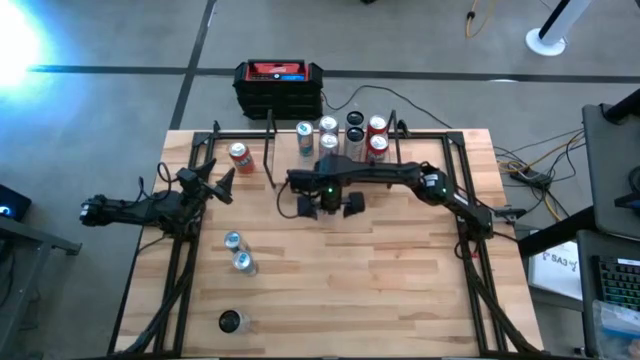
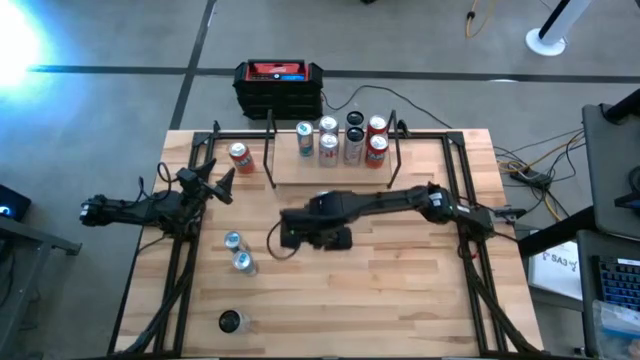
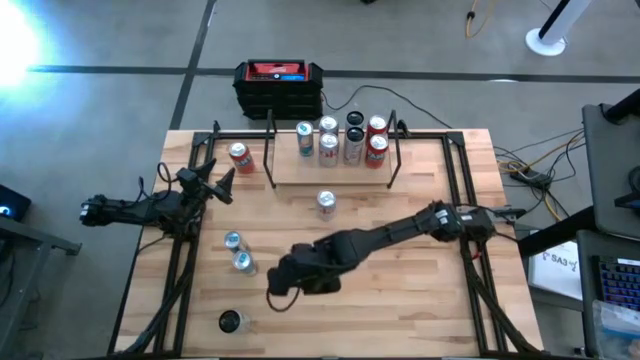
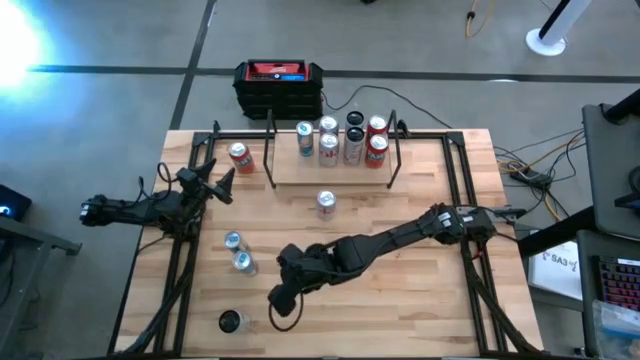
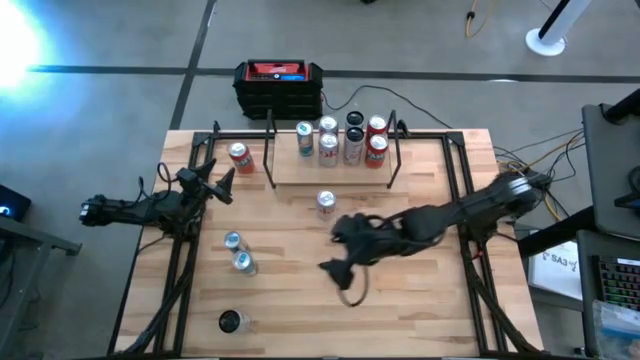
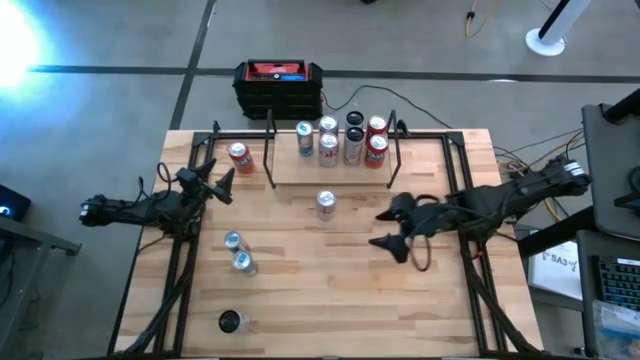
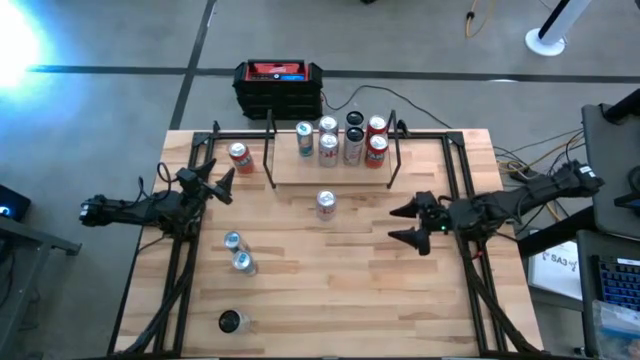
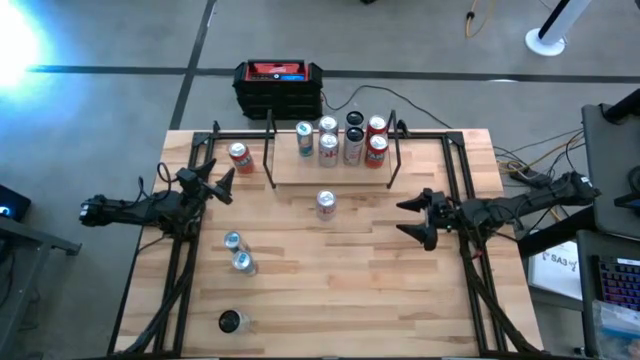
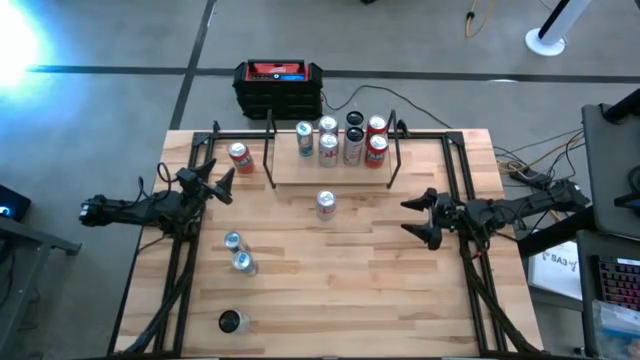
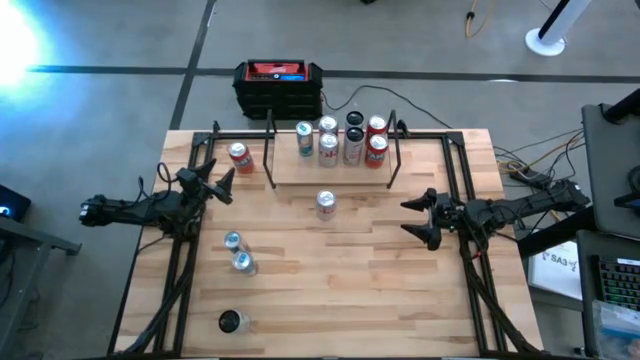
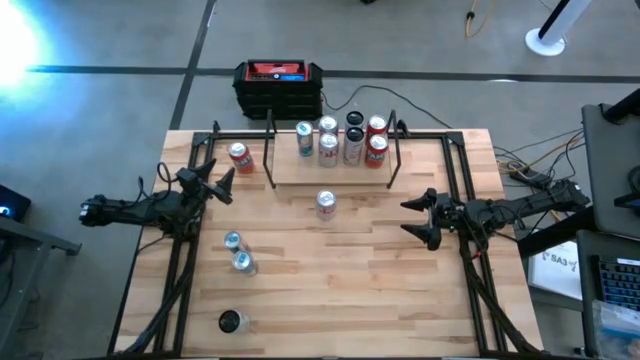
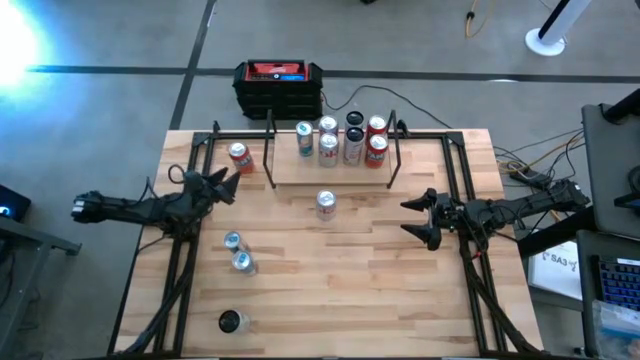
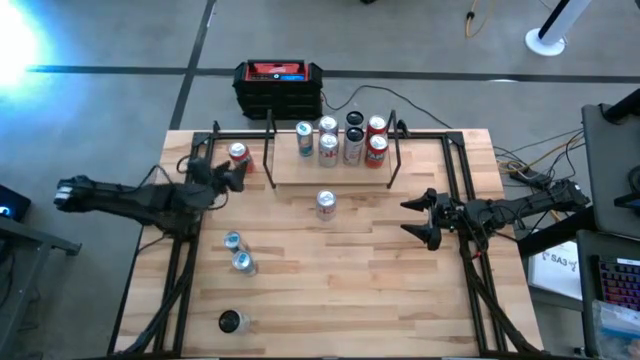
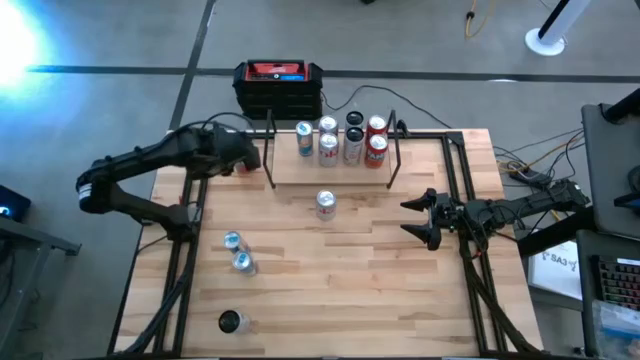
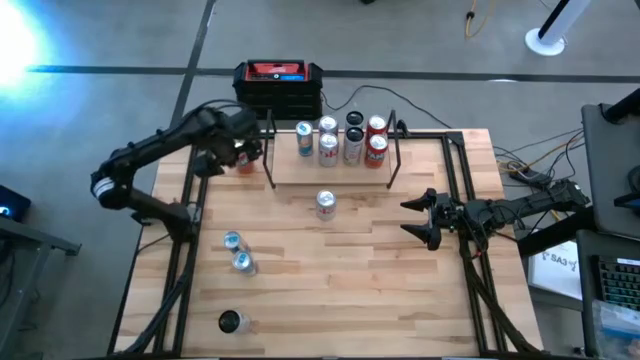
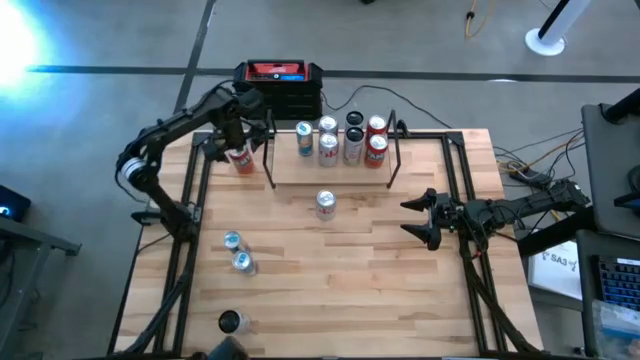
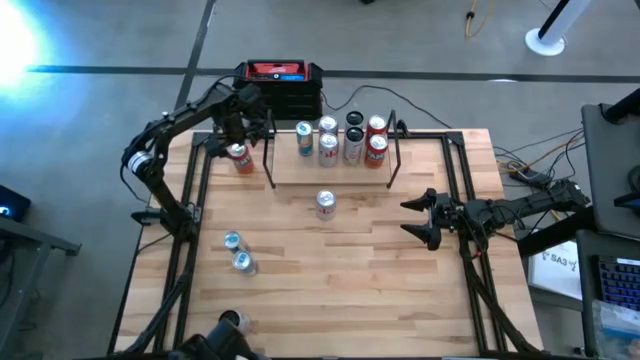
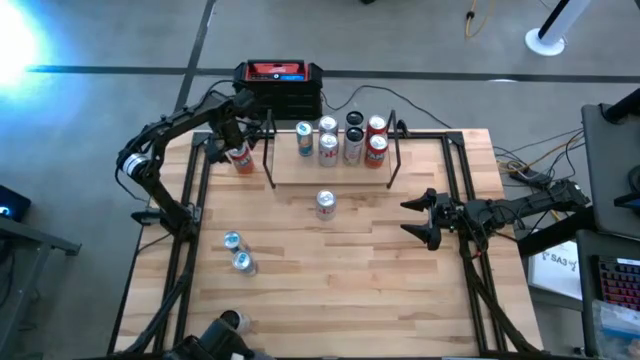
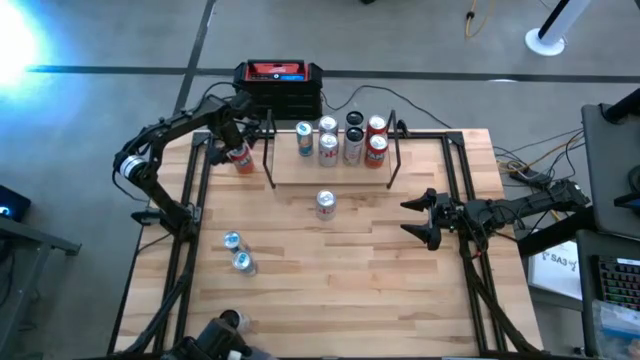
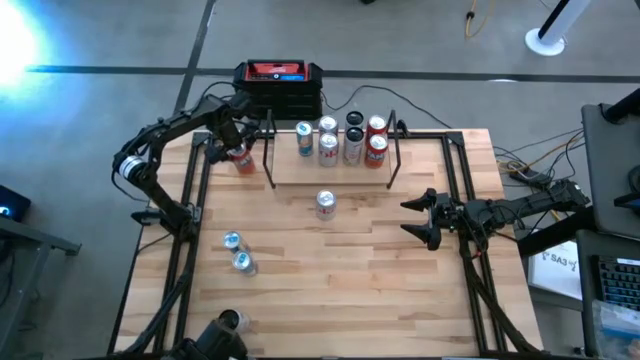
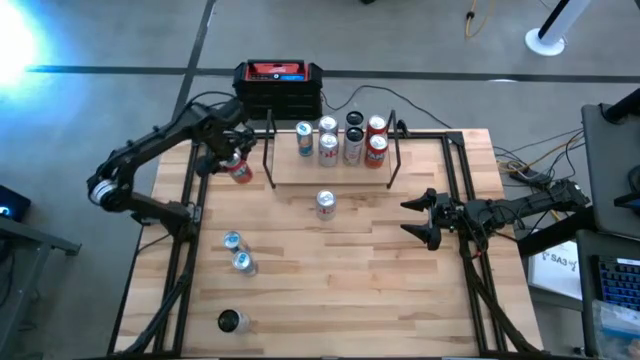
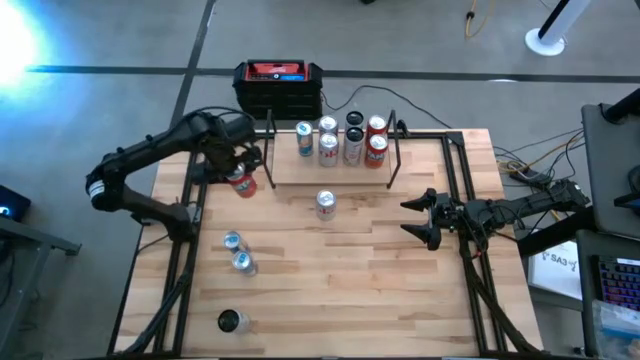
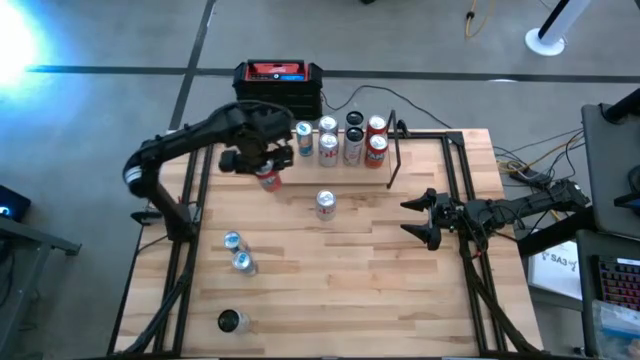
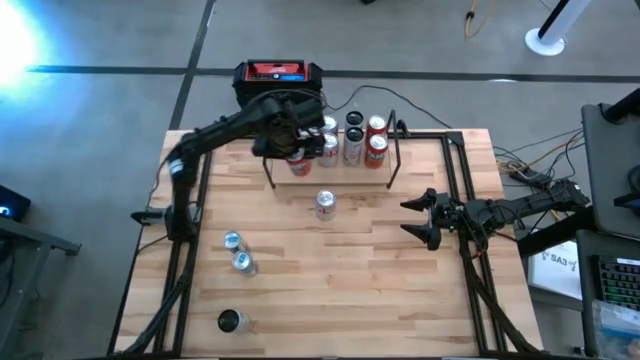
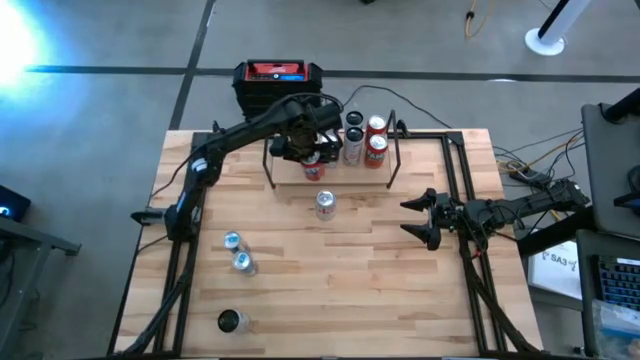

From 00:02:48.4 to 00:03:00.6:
Task: Place canned beverage on shelf
Put the red soda can on the shelf aligned with the silver soda can

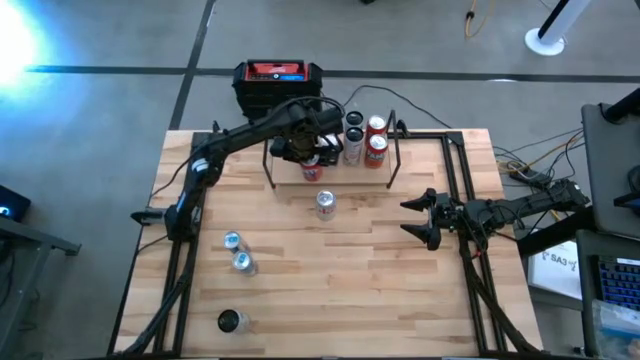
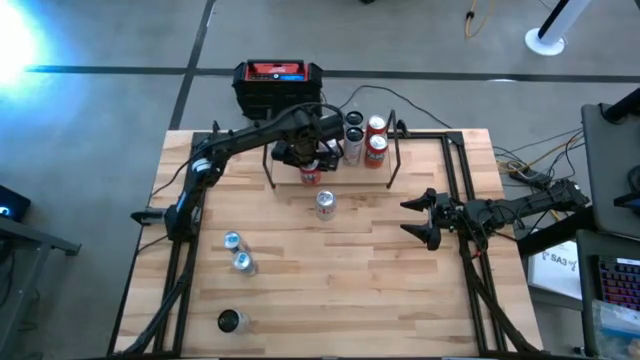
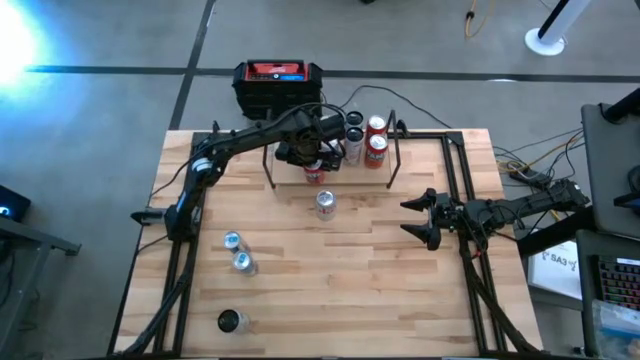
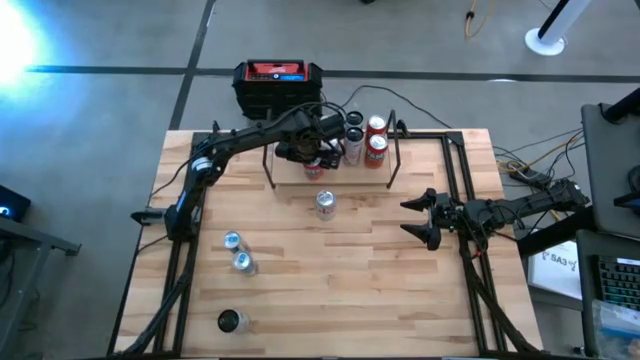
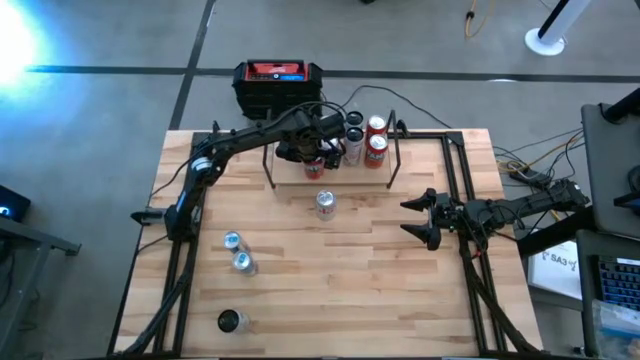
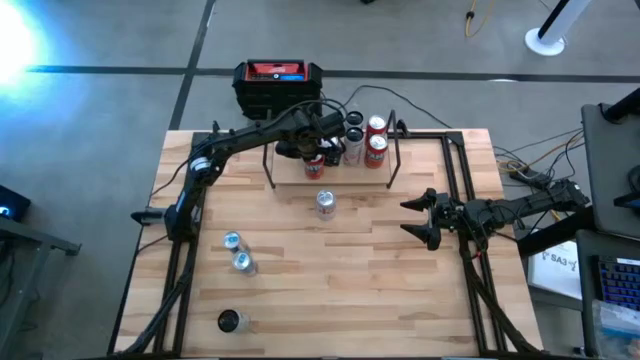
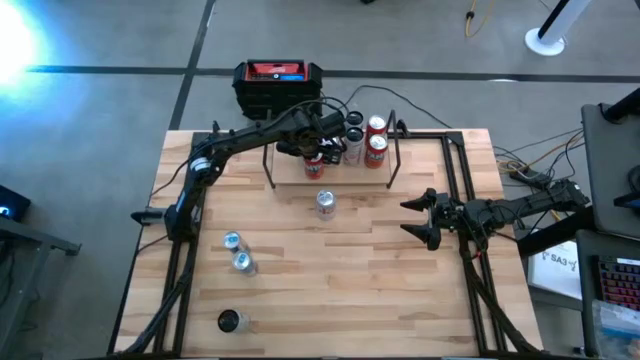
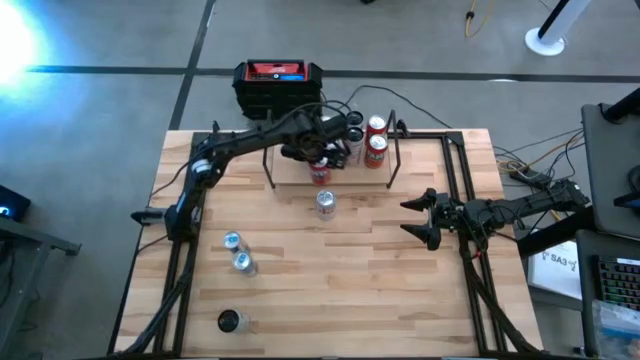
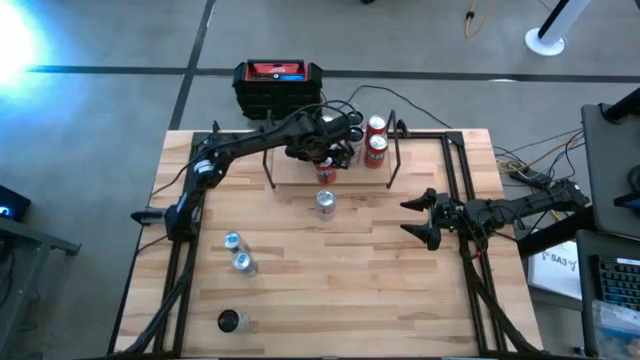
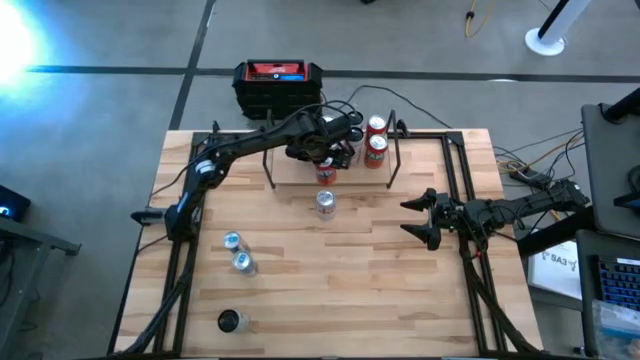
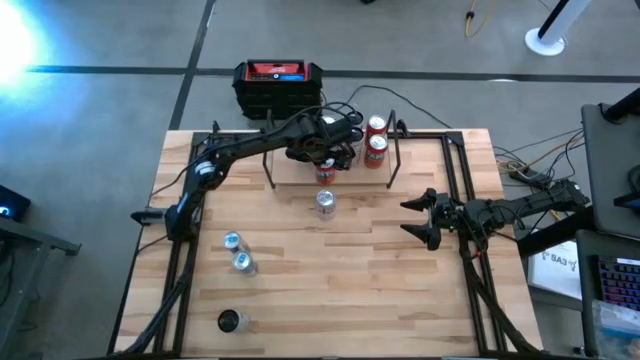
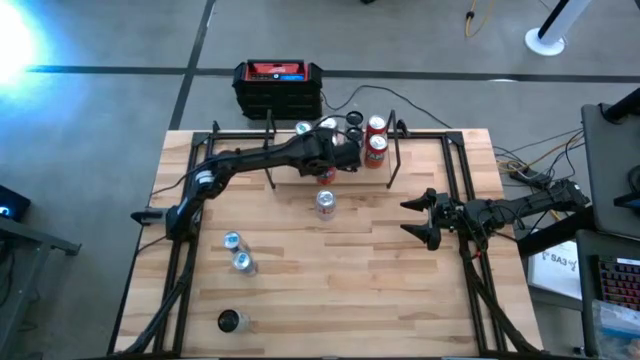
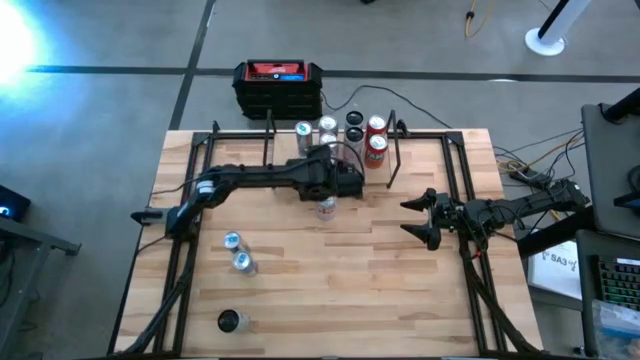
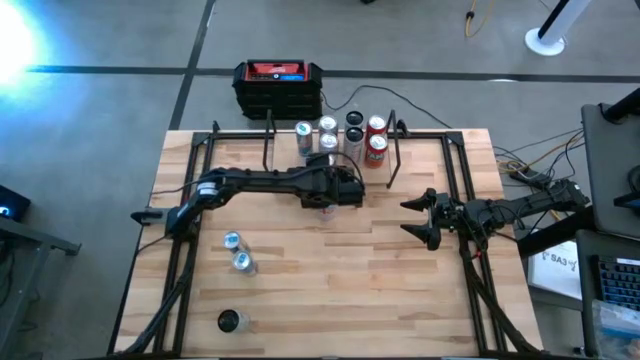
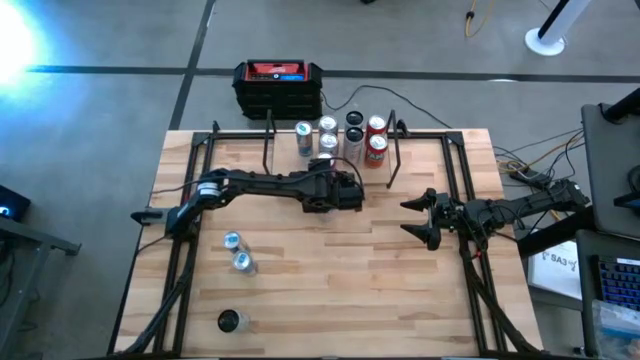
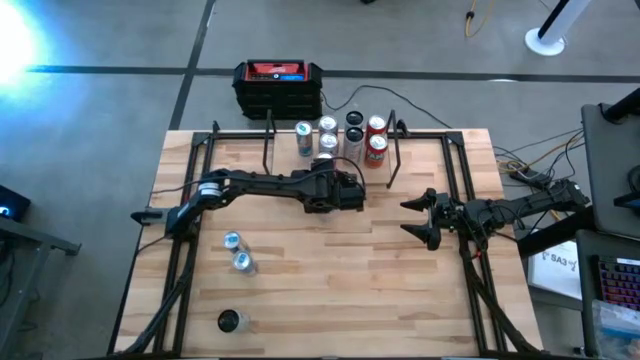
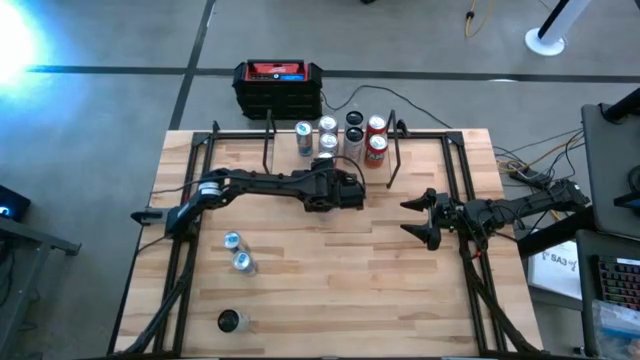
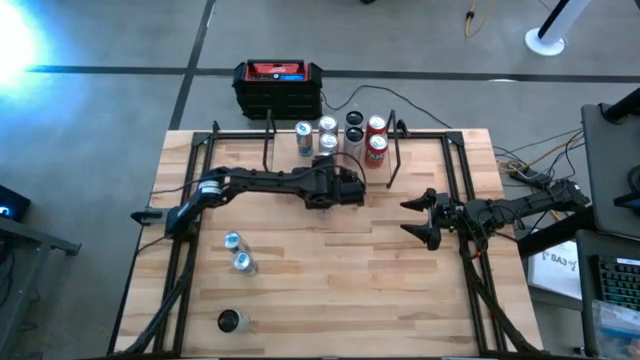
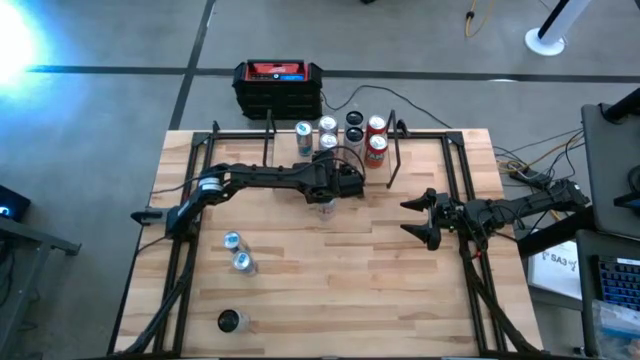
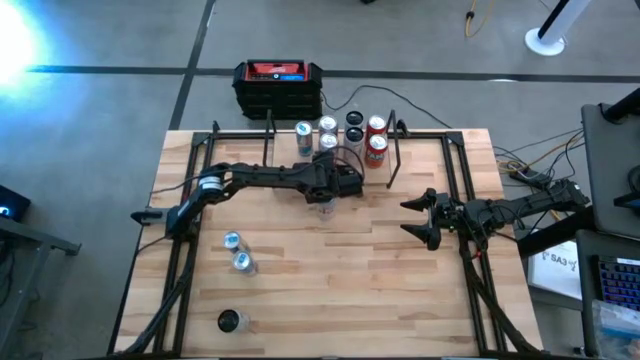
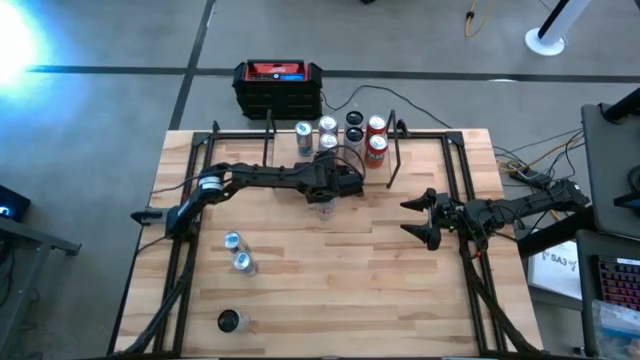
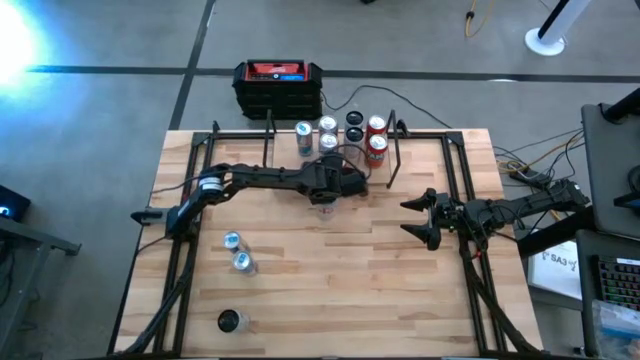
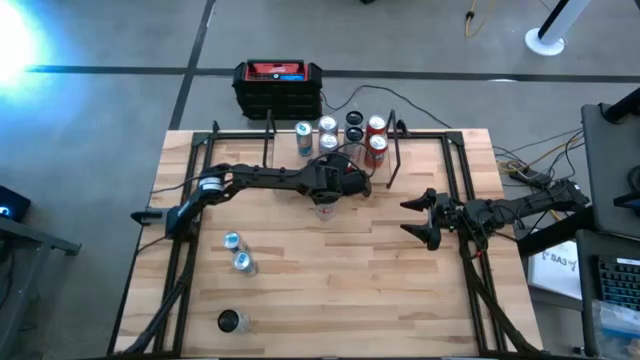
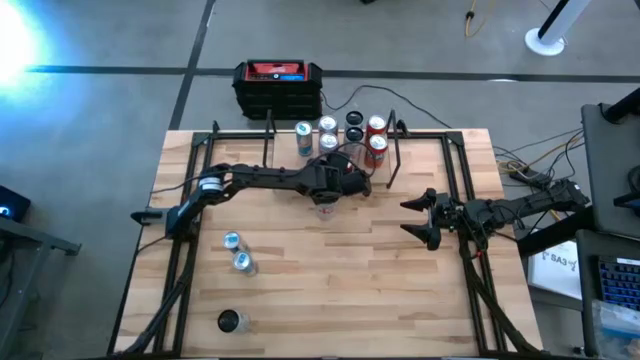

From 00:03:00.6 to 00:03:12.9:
Put the red soda can on the shelf aligned with the silver soda can
